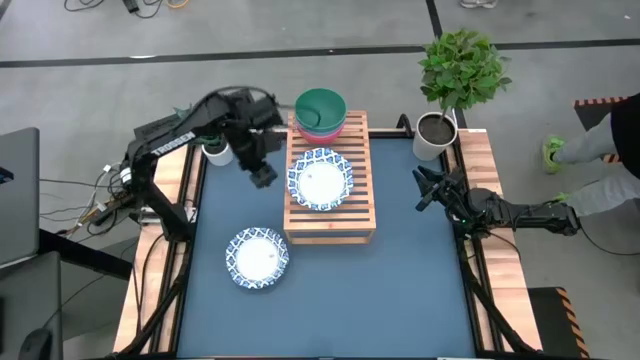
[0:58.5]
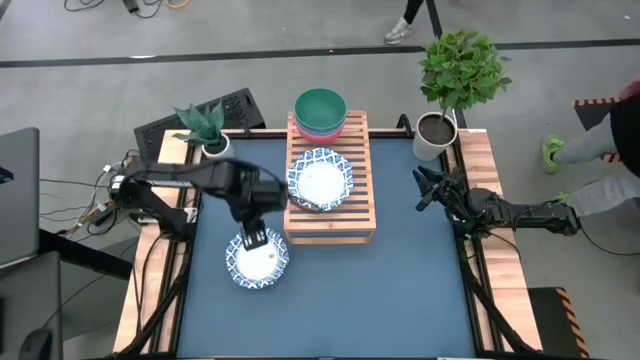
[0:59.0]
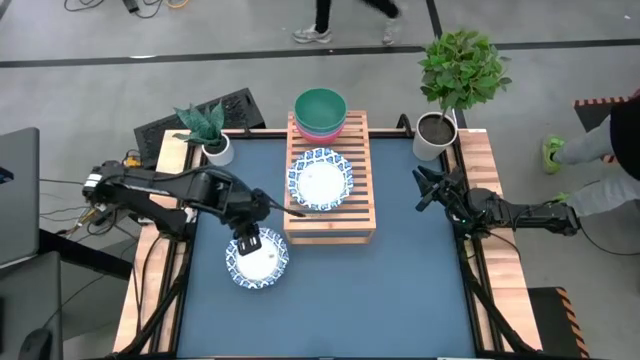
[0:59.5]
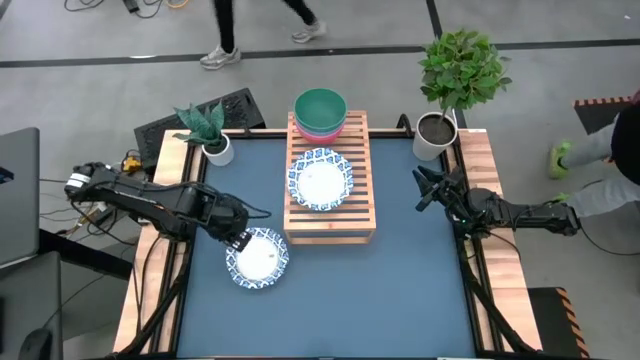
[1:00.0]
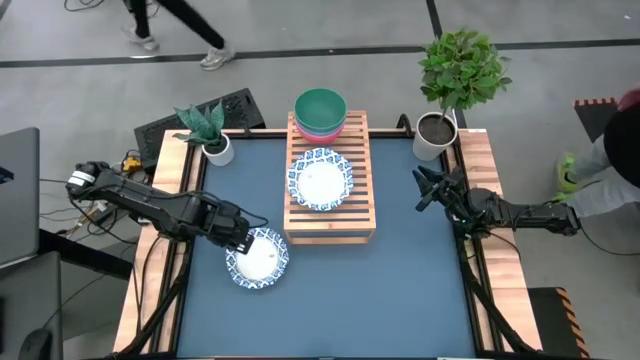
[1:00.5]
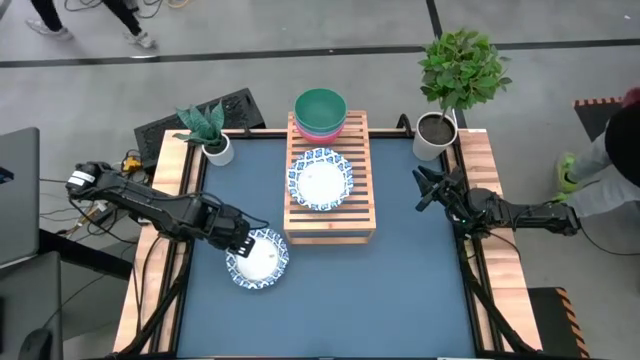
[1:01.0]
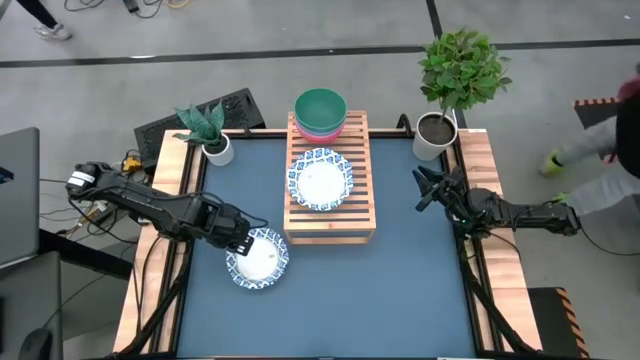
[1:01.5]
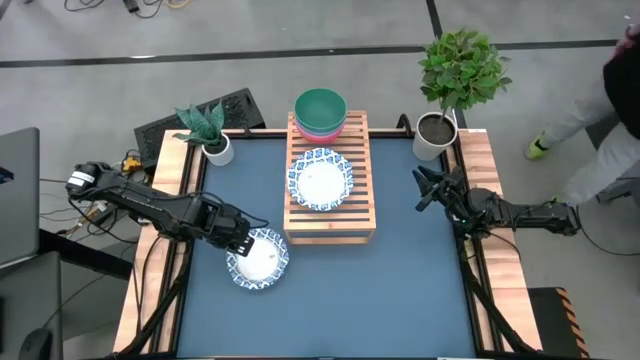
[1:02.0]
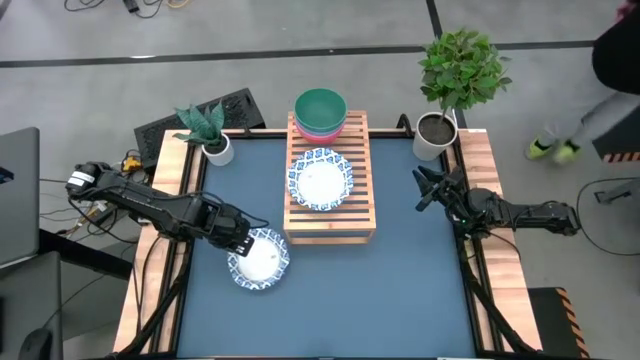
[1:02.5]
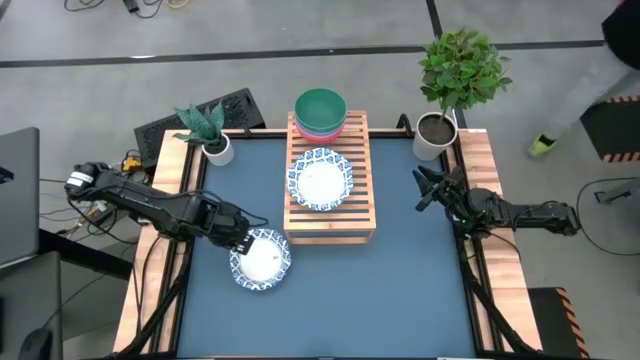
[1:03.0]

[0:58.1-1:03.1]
Task: Place and stack bowls onto a shelf
Stack the white patterned bowl on the white patterned bowl

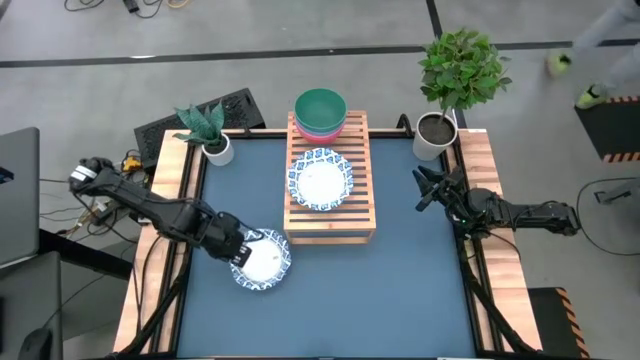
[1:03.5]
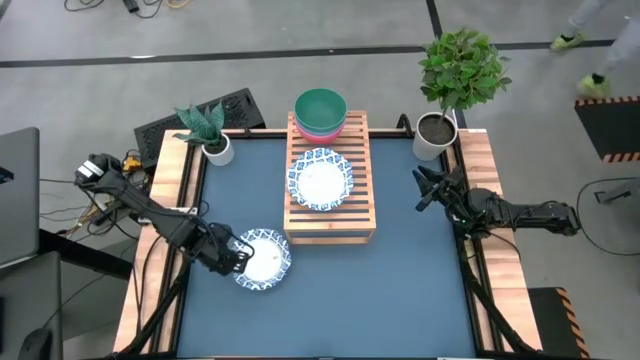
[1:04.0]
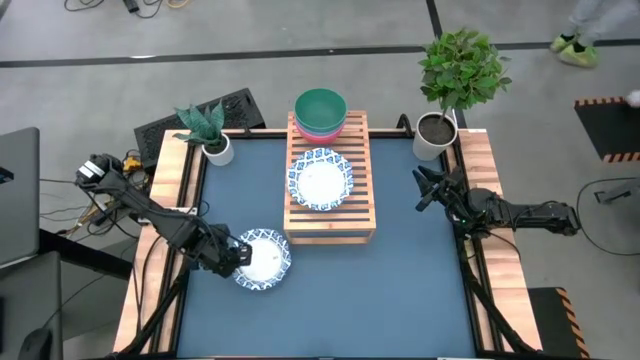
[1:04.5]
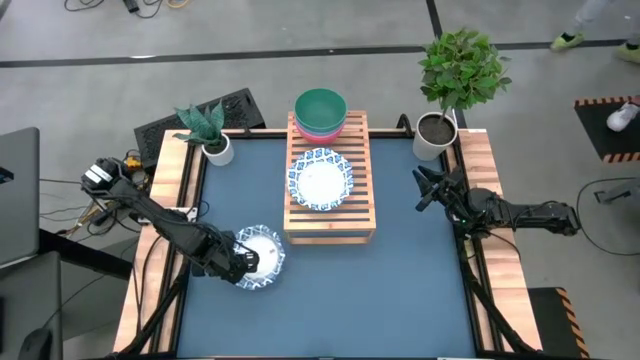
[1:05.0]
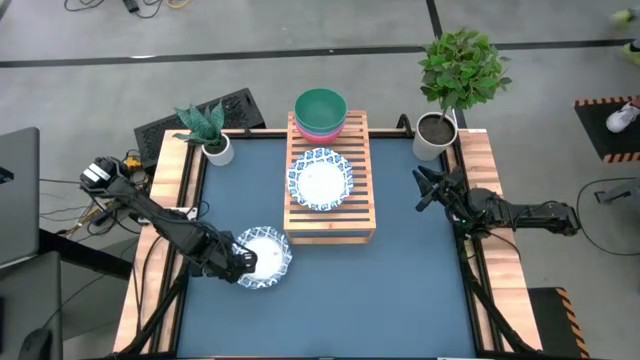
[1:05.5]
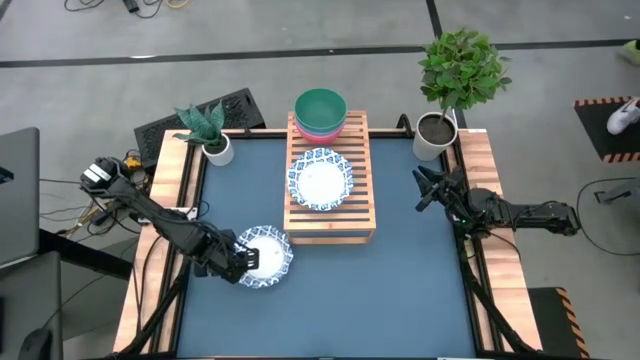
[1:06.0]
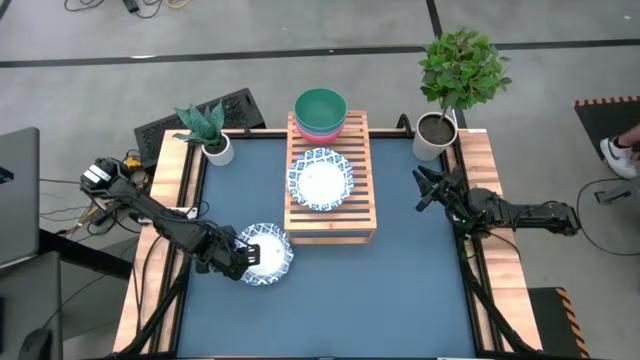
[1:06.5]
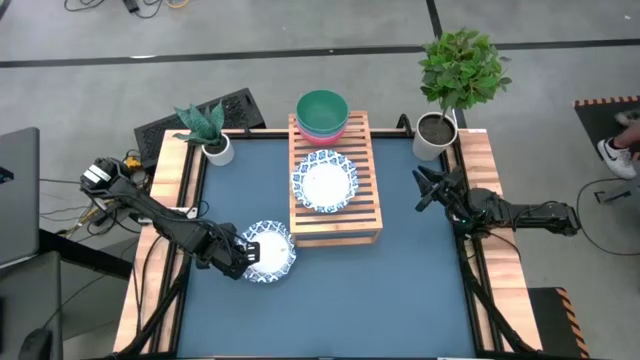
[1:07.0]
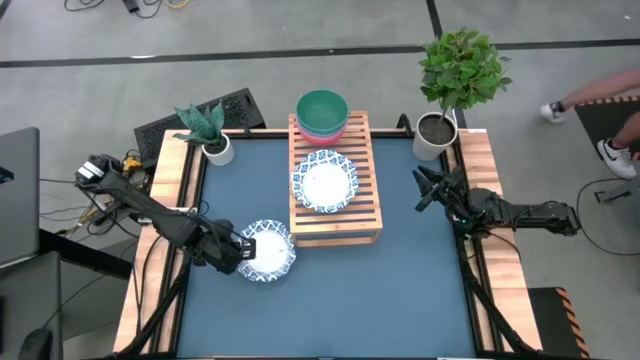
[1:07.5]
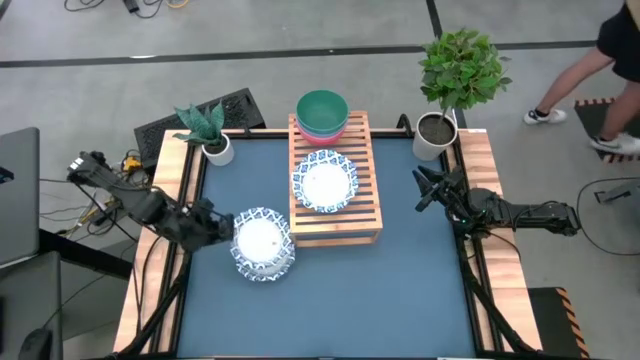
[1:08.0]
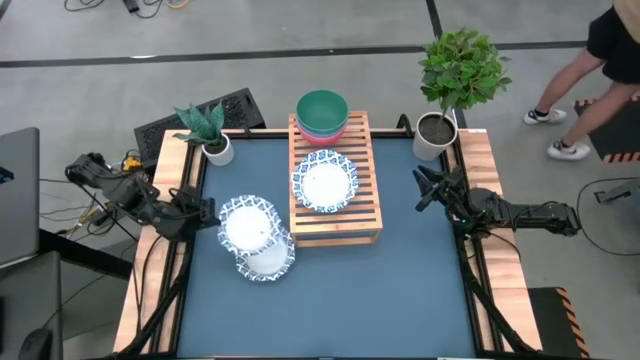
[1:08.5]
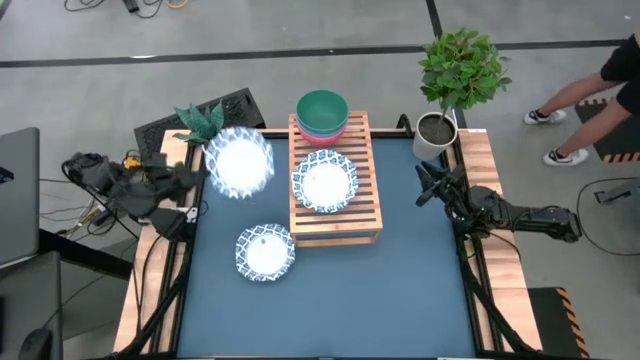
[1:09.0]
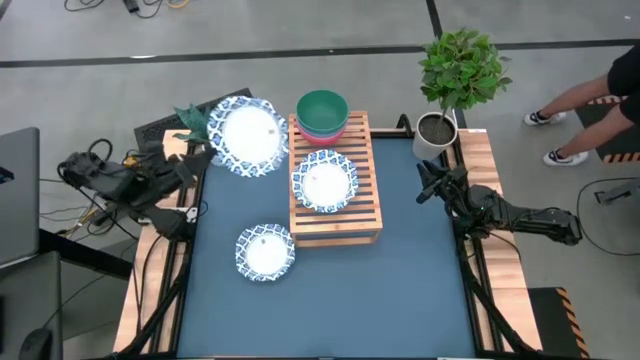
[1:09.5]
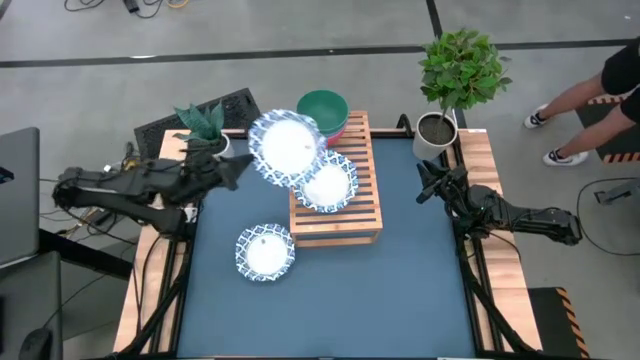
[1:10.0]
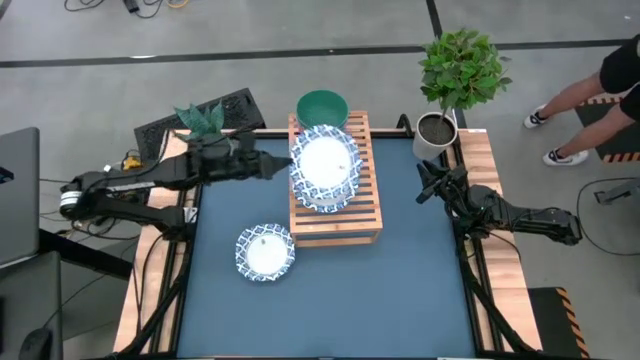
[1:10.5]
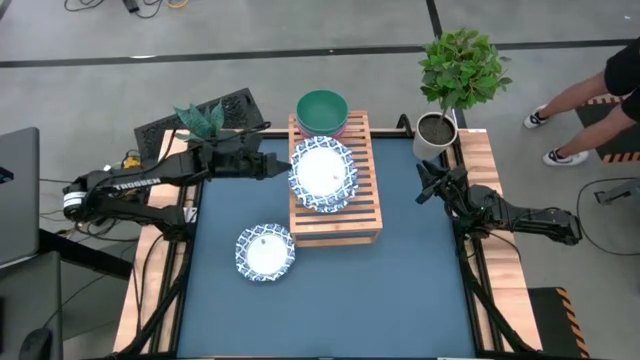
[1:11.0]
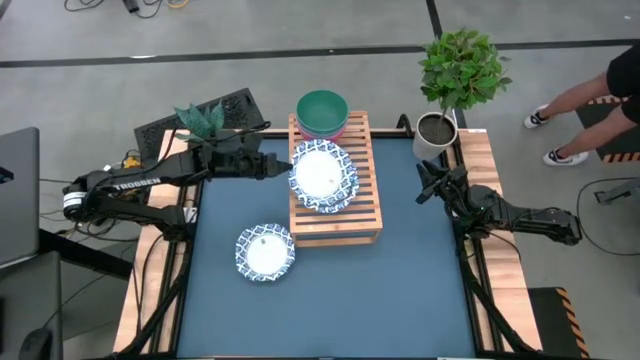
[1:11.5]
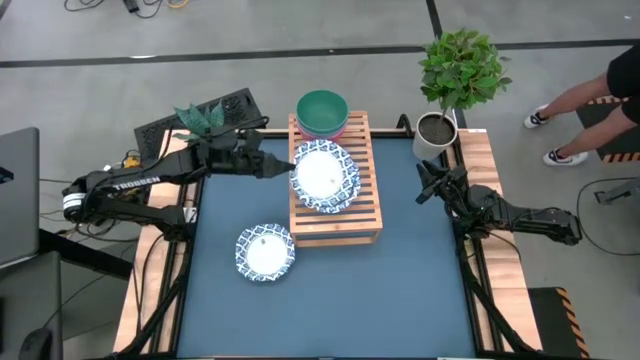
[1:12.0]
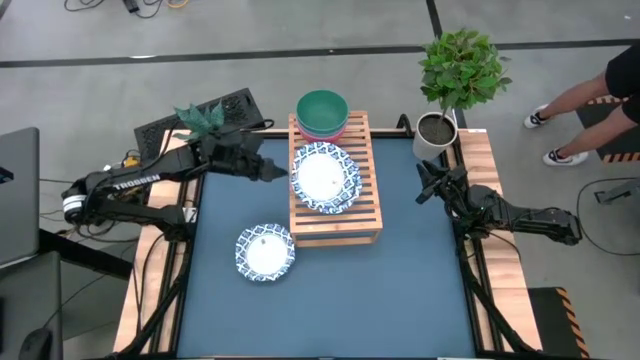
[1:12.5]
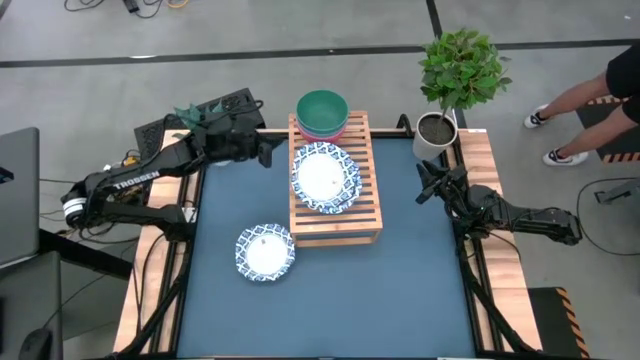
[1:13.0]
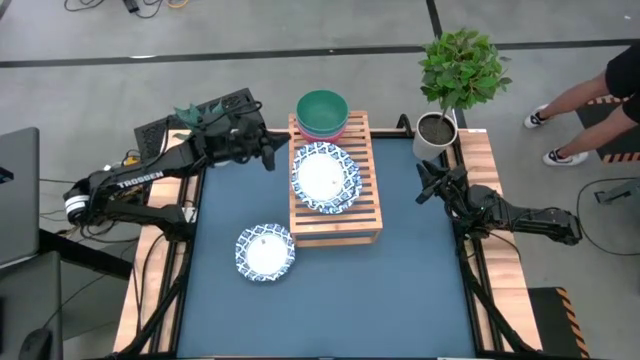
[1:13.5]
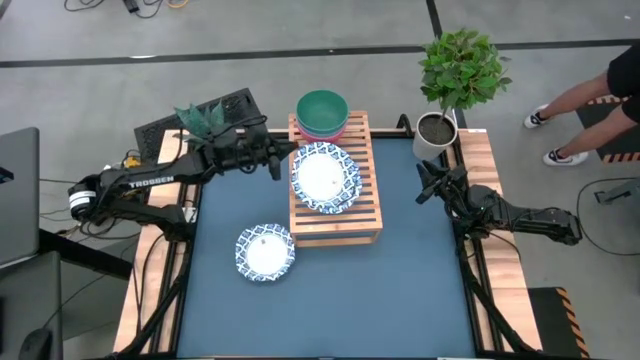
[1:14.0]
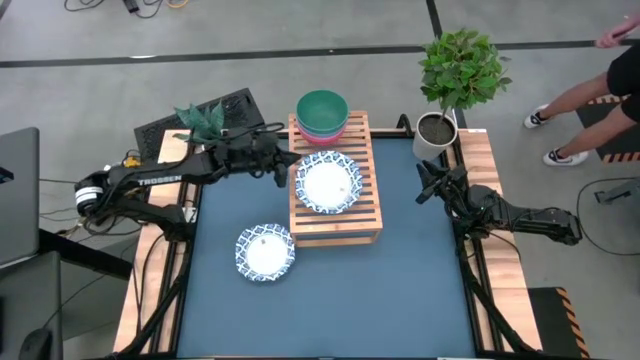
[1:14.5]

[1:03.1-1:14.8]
Stack the white patterned bowl on the the white patterned bowl

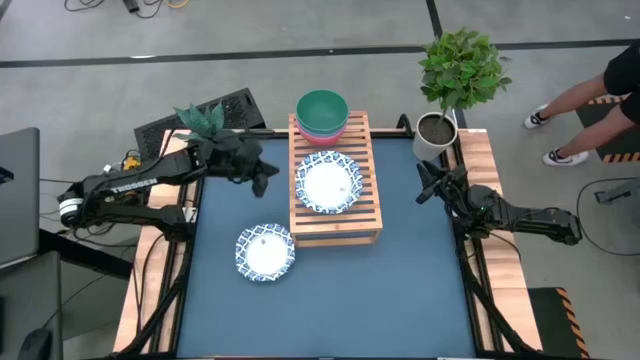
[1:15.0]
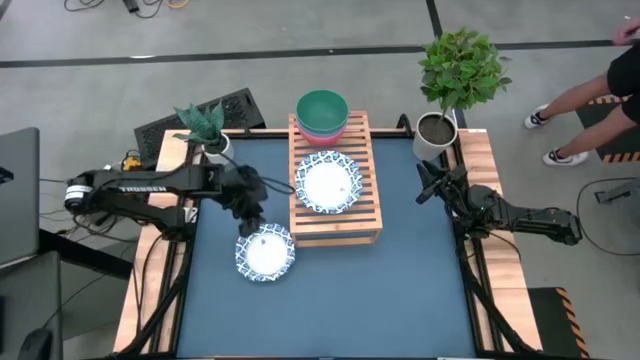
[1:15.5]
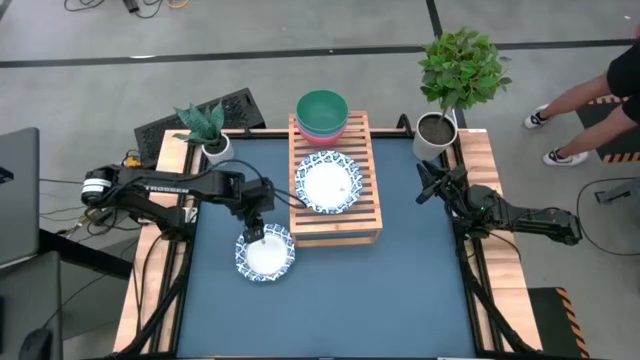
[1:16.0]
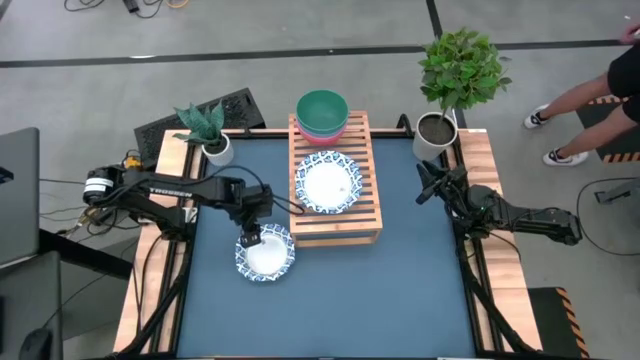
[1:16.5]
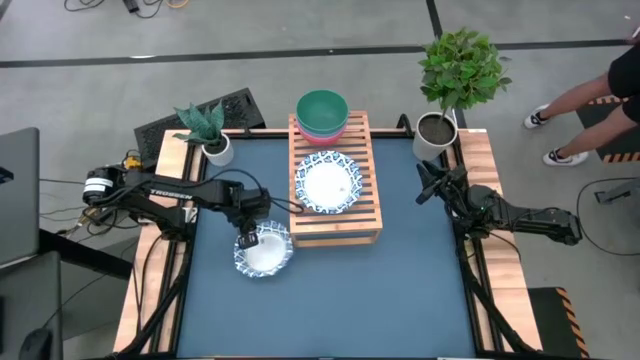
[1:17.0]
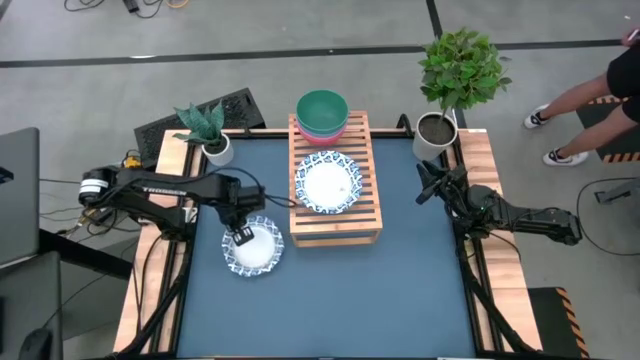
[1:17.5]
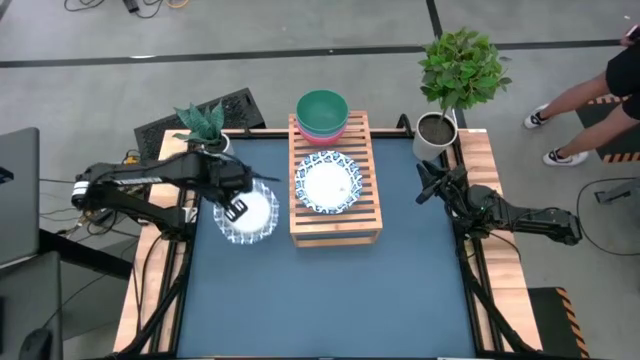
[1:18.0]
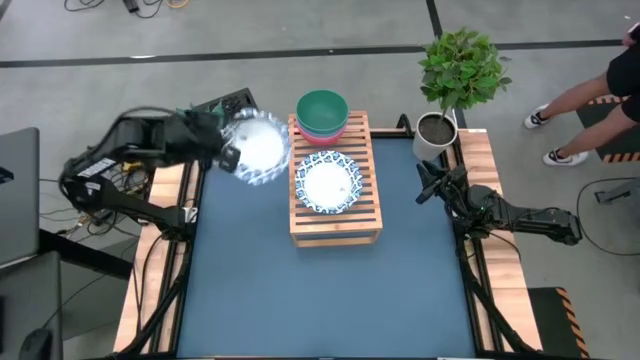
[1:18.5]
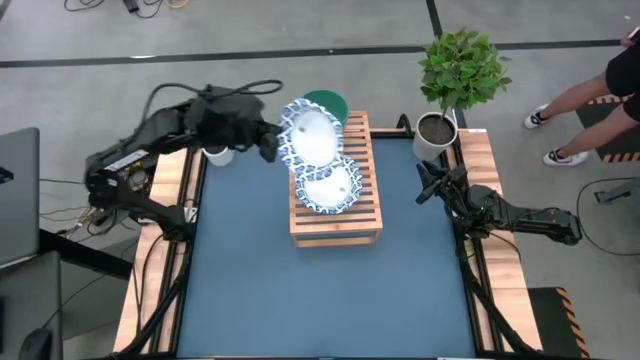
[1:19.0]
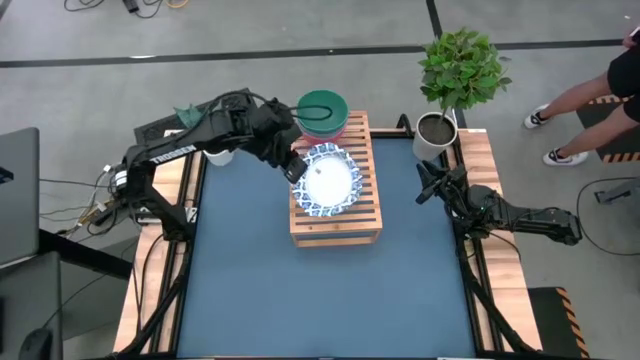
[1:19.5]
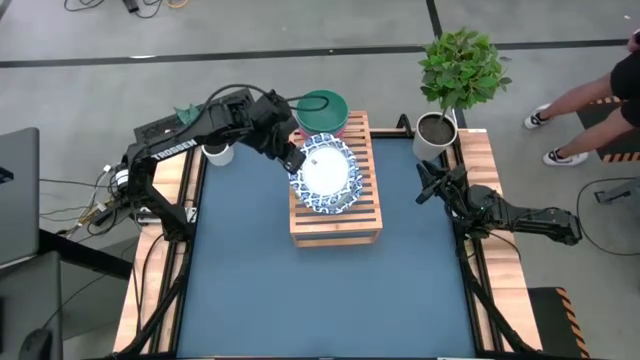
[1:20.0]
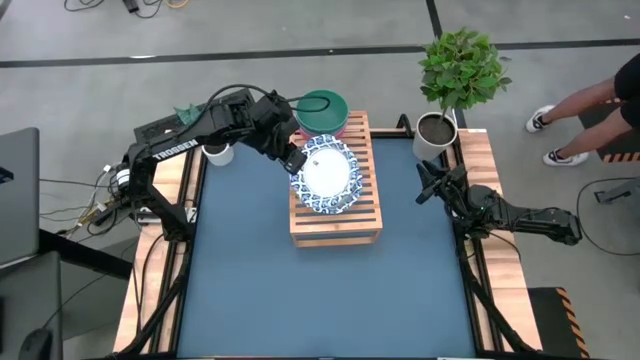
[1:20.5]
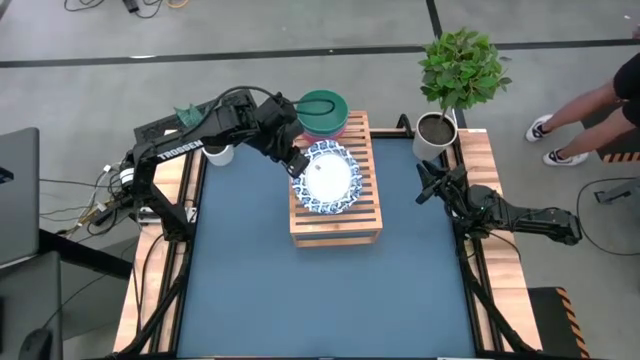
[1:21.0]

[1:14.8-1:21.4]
Stack the white patterned bowl on the white patterned bowl
